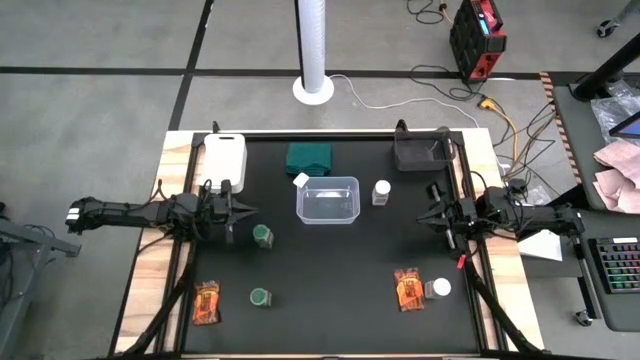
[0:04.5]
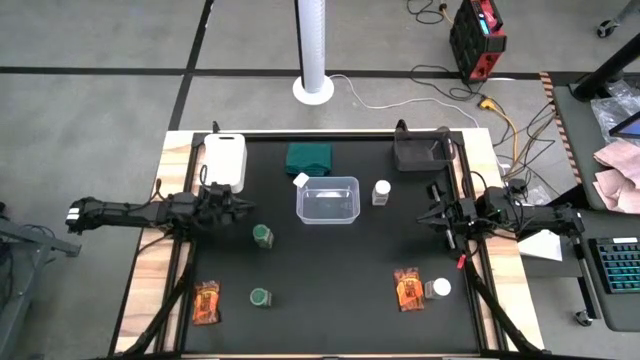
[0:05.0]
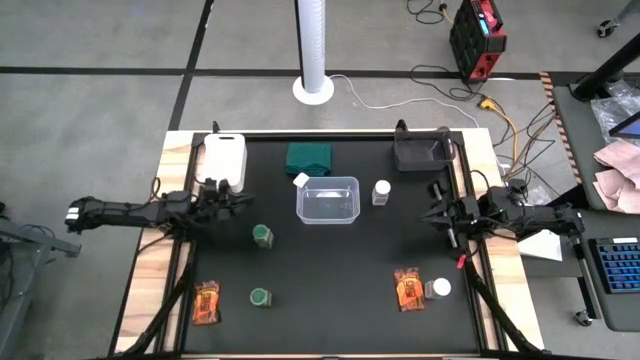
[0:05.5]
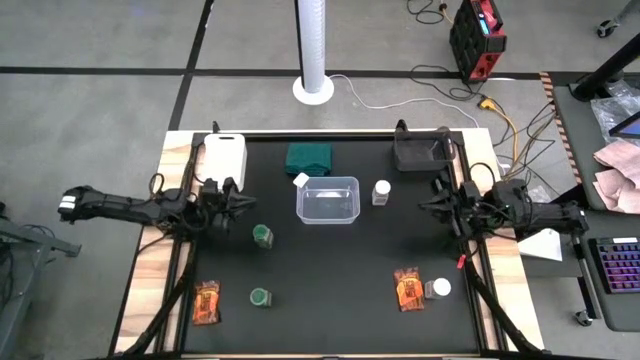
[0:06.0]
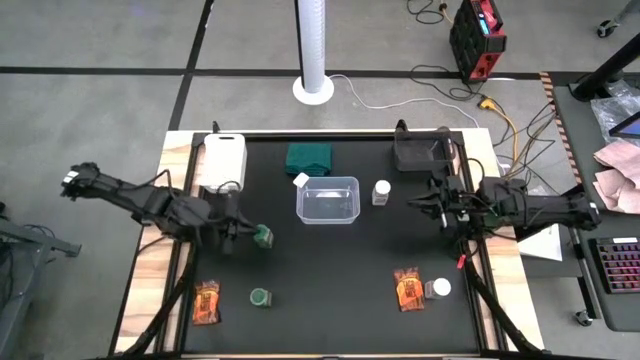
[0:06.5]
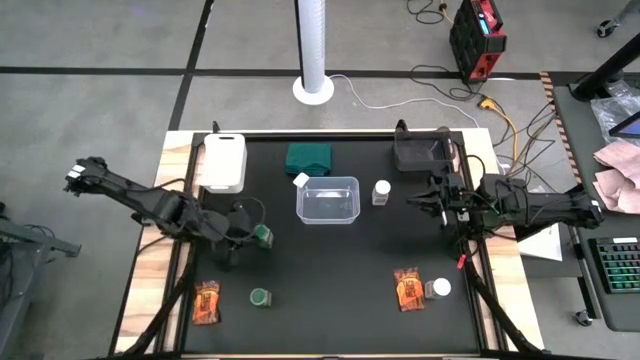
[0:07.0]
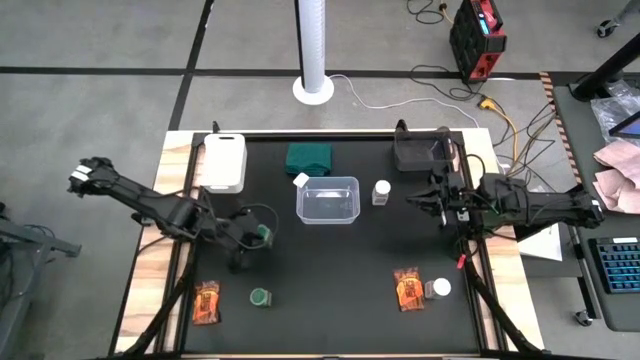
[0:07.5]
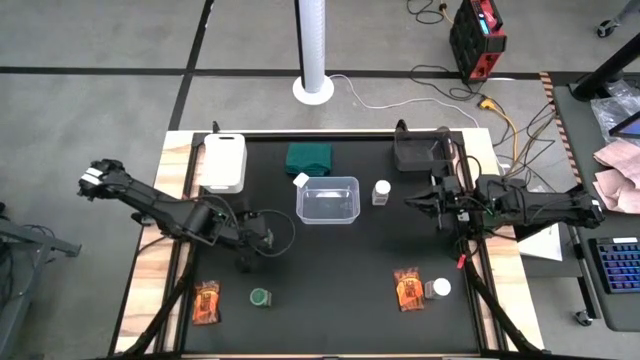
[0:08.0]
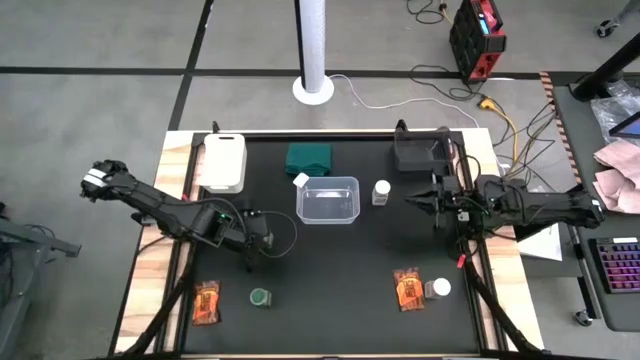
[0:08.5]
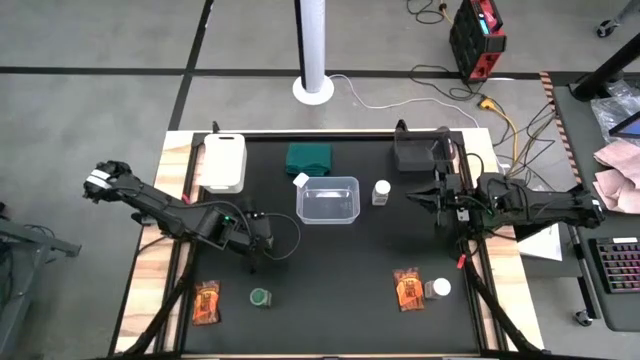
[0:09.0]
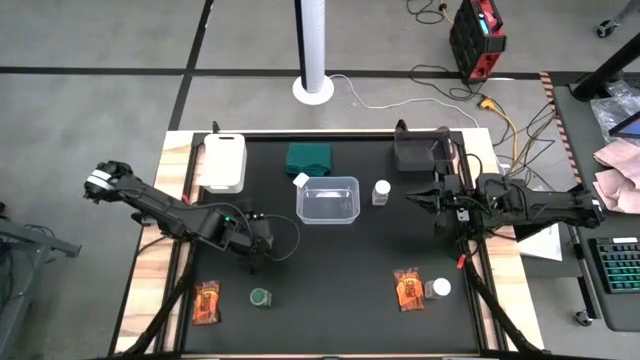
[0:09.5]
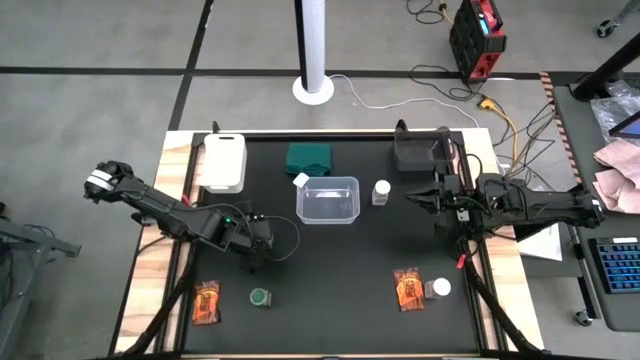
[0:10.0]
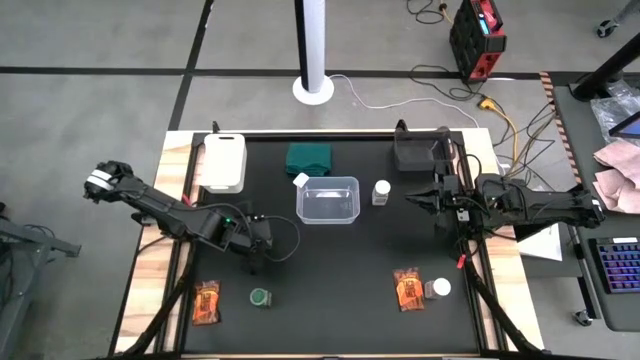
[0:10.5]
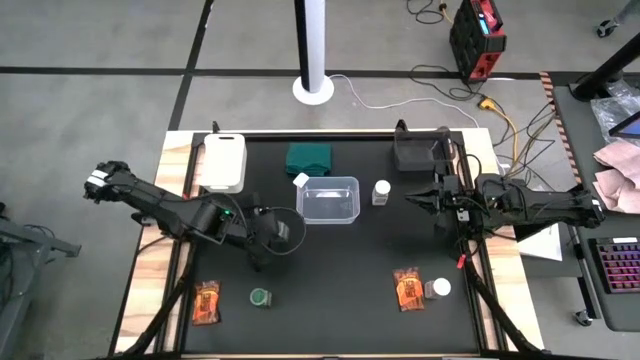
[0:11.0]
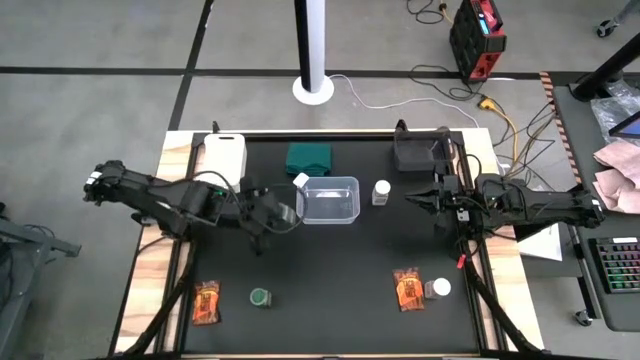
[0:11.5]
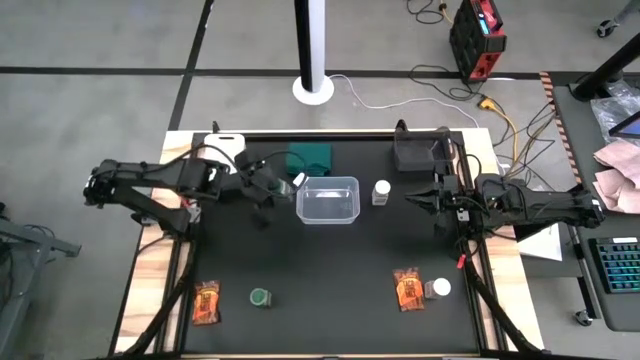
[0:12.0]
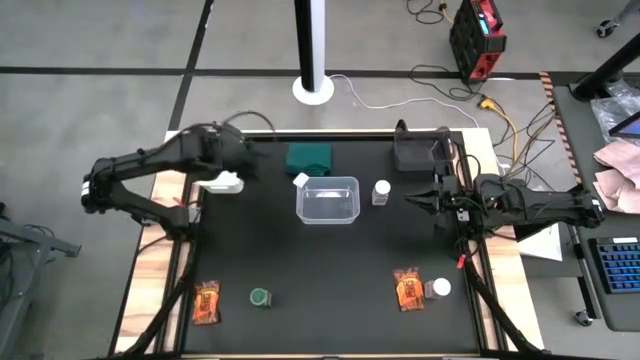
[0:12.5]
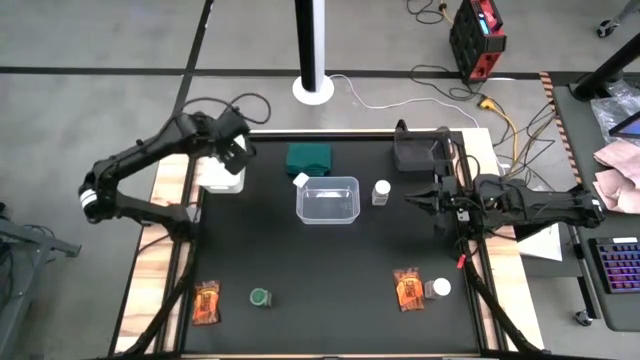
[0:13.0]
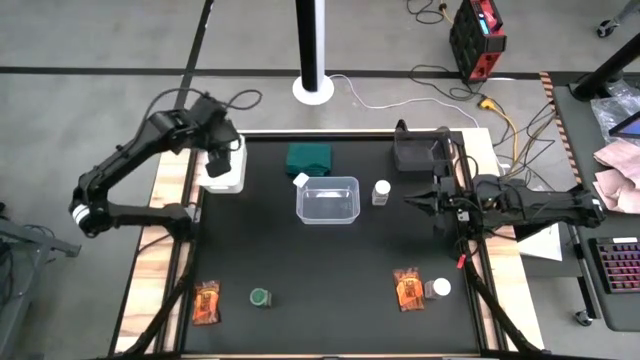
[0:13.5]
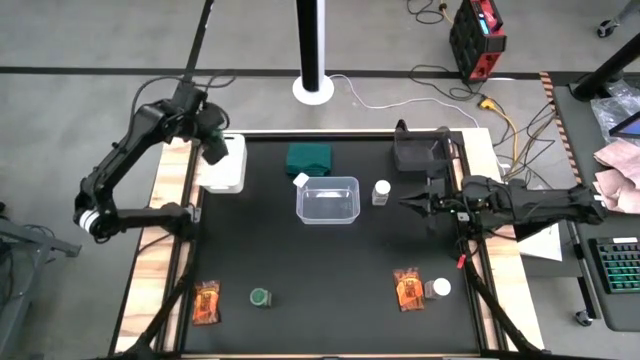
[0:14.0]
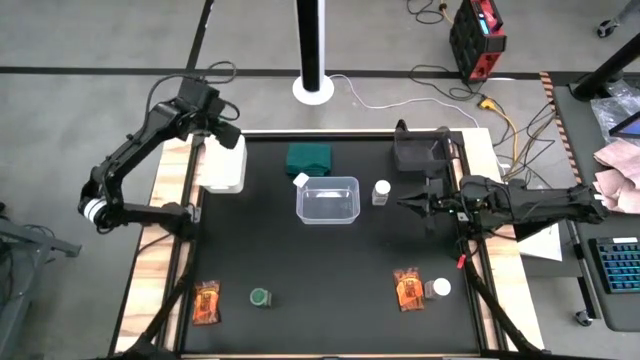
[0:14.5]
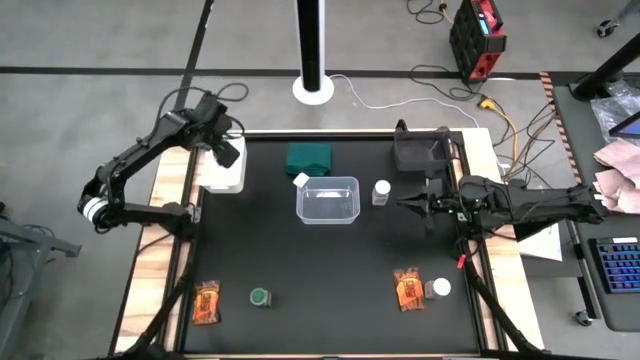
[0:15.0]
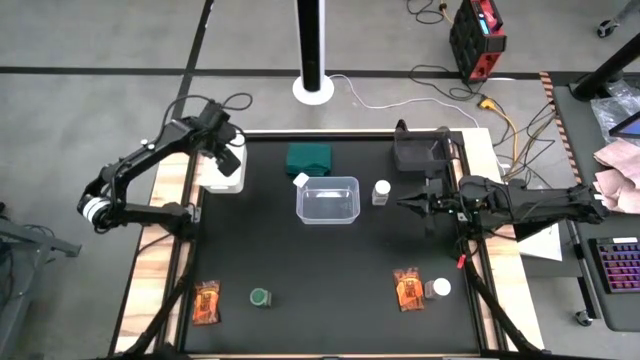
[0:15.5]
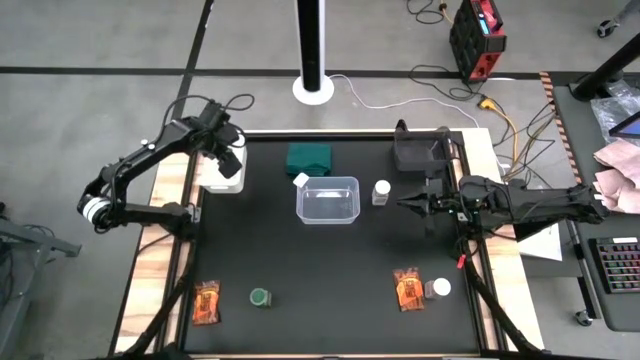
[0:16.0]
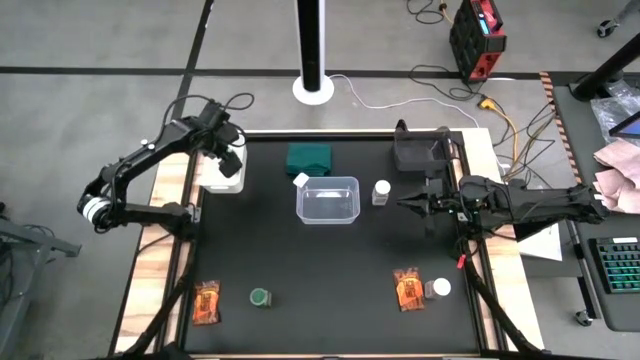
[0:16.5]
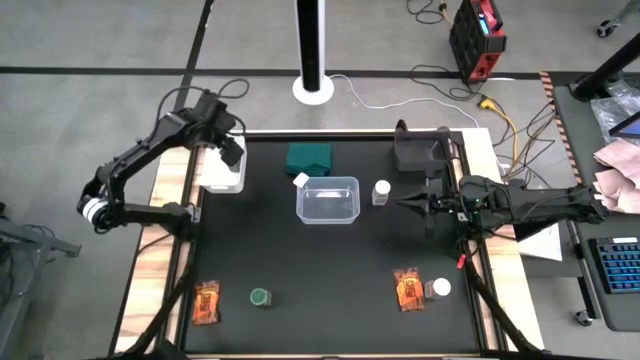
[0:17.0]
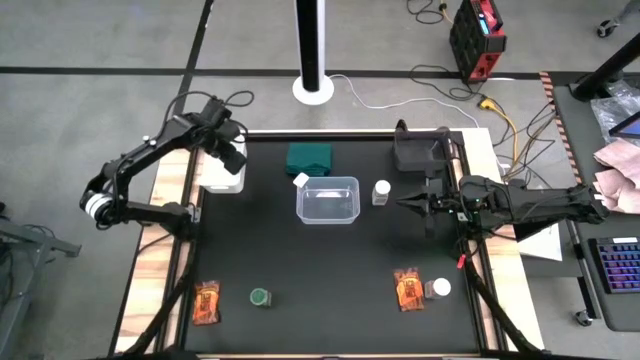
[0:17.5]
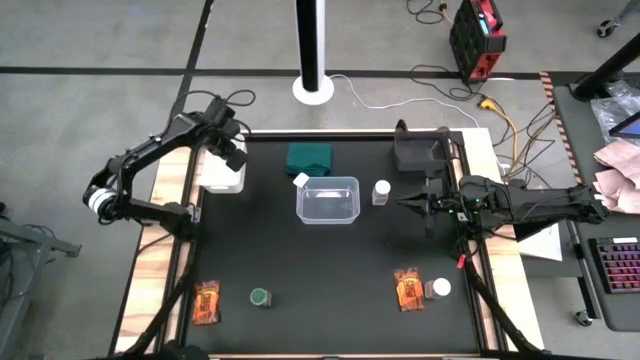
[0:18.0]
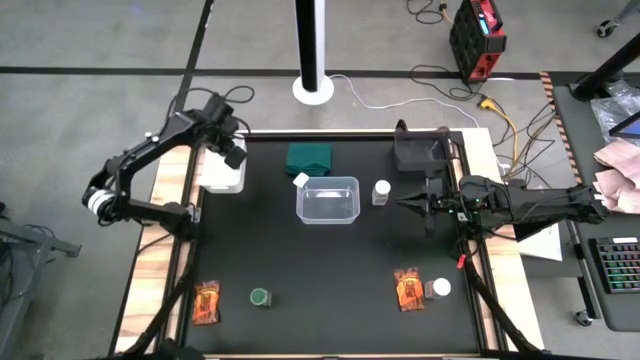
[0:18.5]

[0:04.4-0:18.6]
Task: Sort spices by type
Put the top green spice bottle into the white bin

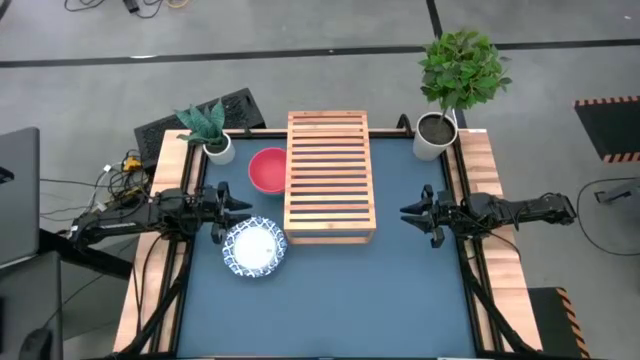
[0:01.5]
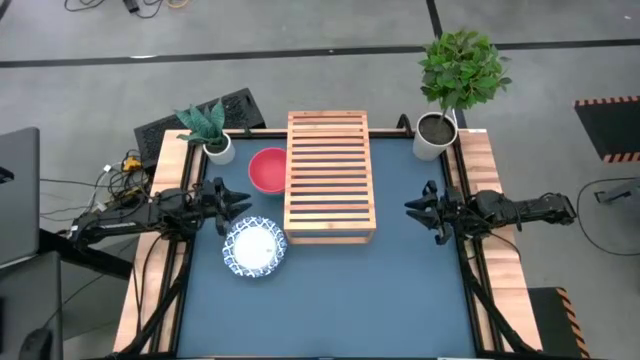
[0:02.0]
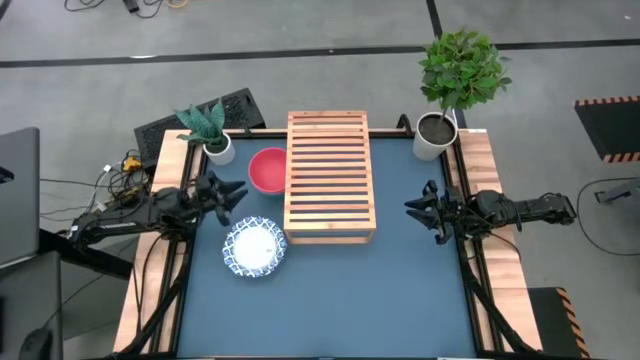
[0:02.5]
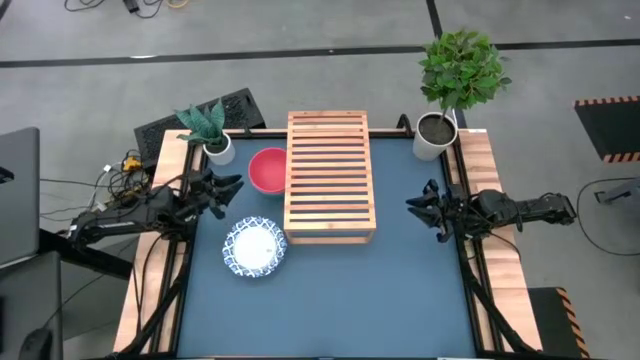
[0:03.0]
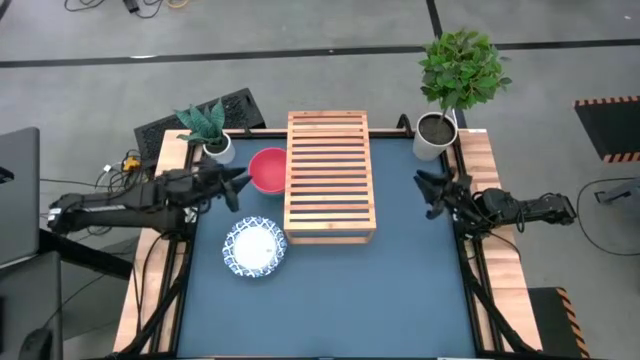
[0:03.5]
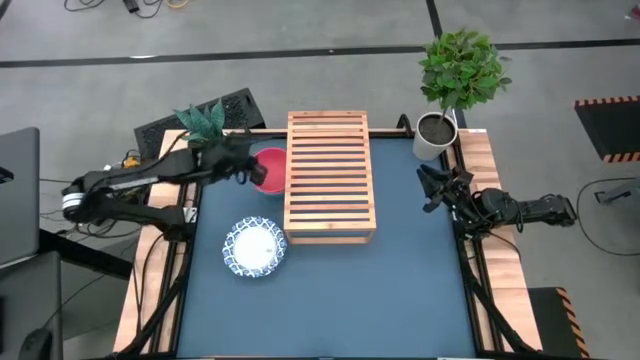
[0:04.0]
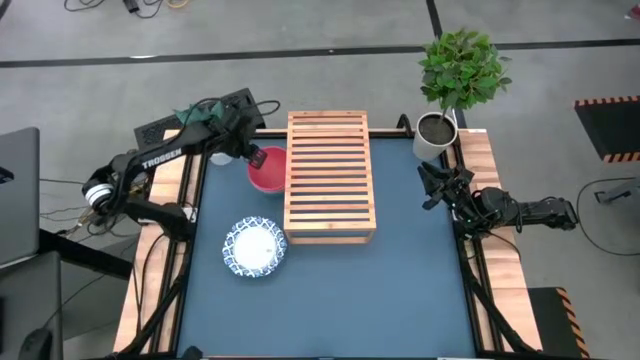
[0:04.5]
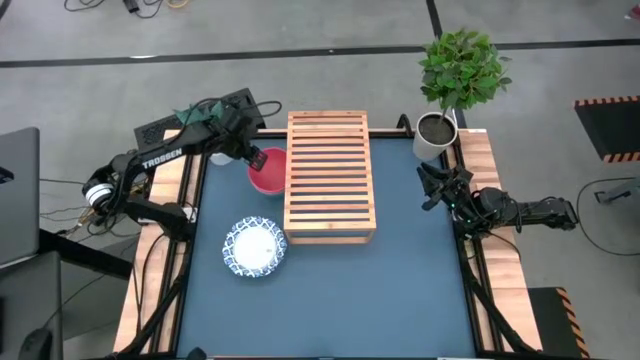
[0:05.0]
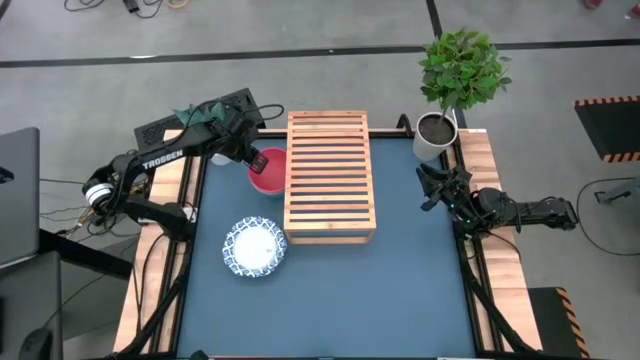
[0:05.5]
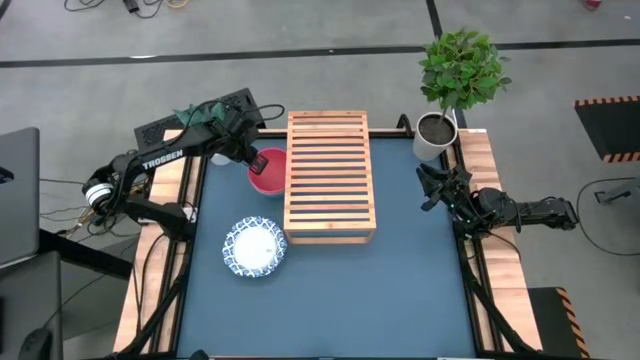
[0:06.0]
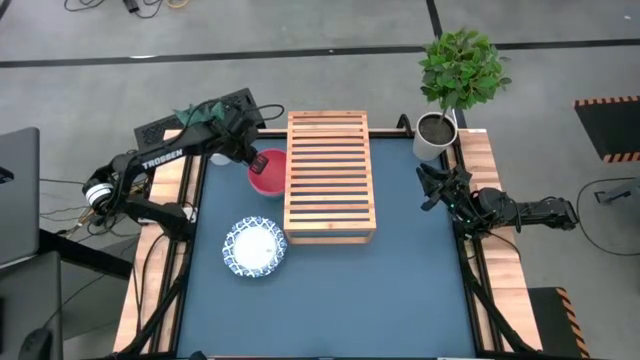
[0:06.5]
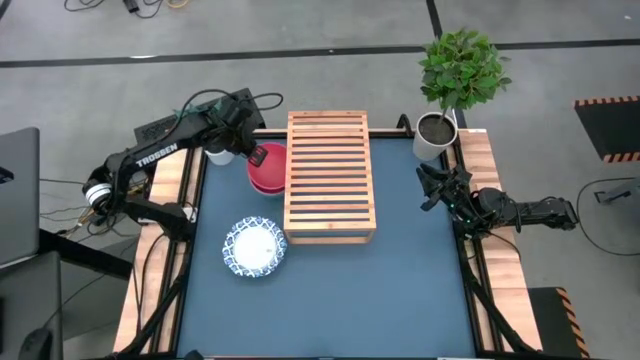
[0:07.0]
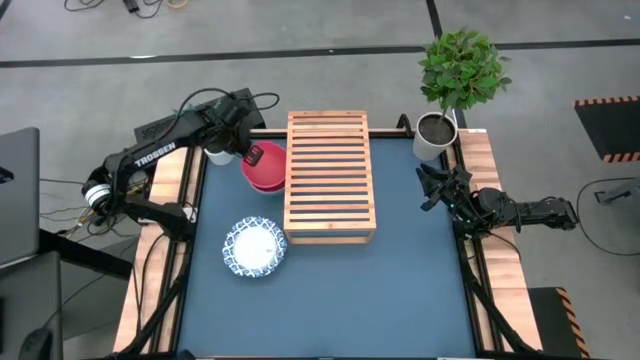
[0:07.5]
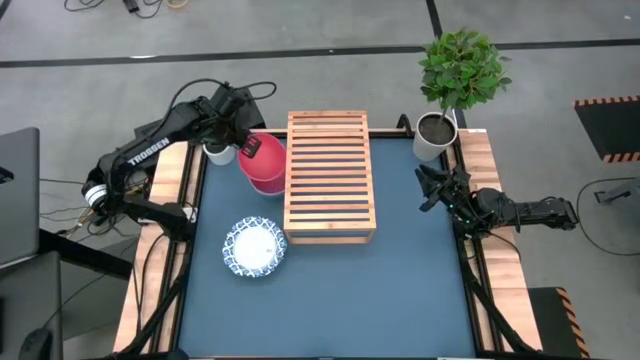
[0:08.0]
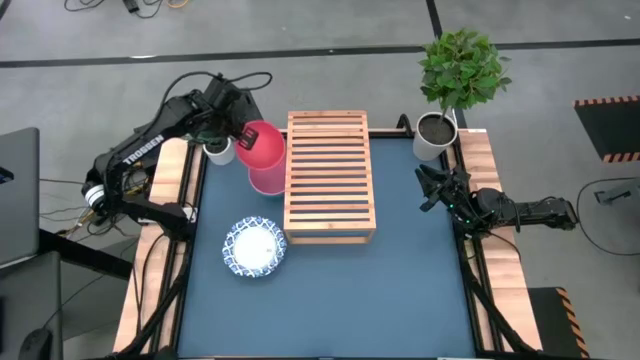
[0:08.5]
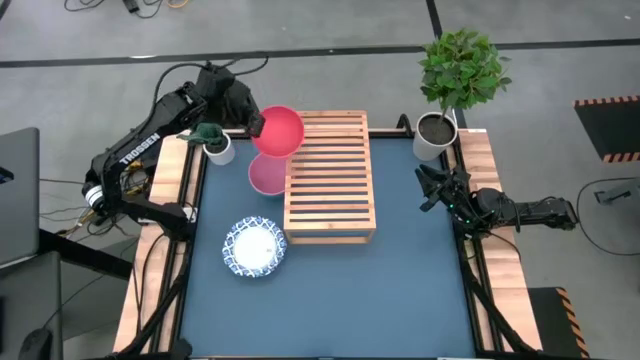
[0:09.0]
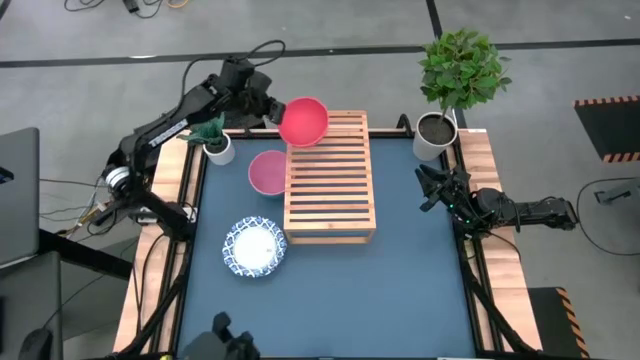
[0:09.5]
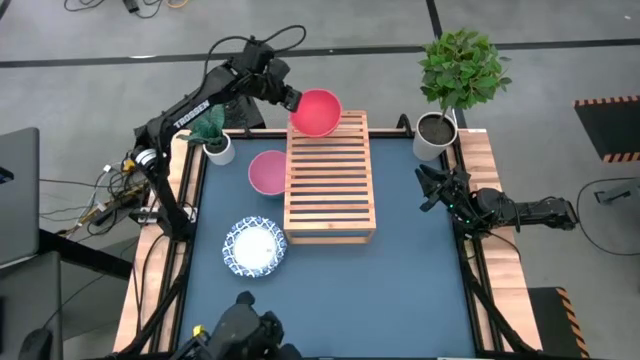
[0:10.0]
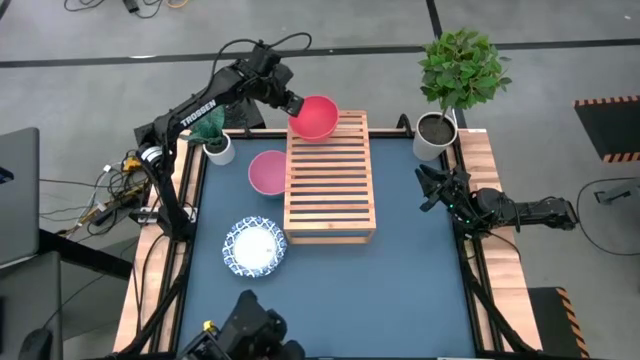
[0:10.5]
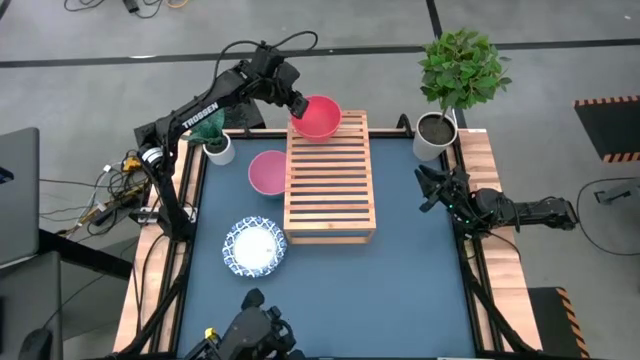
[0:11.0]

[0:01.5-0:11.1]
Task: Place and stack bowls onto a shelf
Put the red bowl on the shelf
